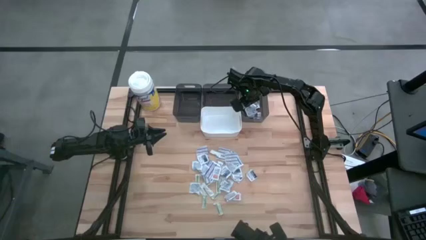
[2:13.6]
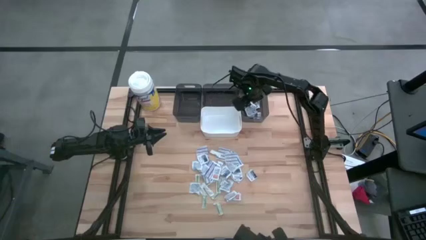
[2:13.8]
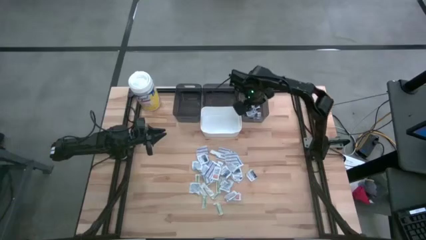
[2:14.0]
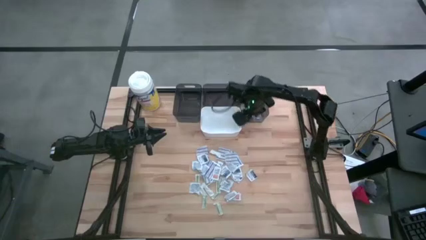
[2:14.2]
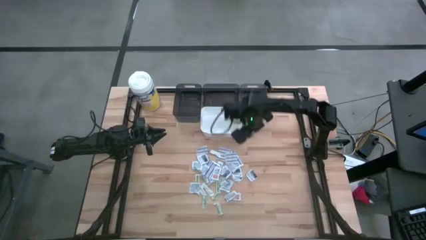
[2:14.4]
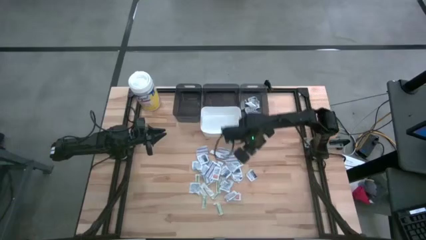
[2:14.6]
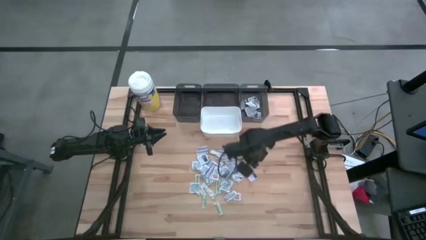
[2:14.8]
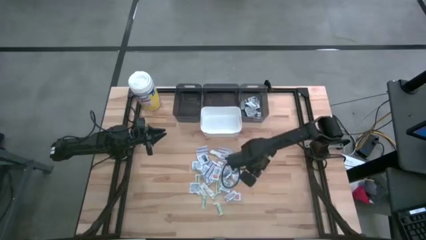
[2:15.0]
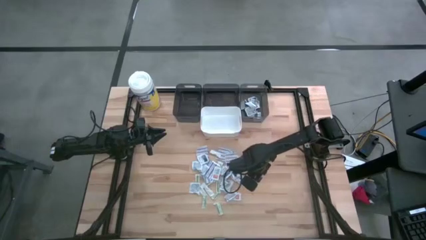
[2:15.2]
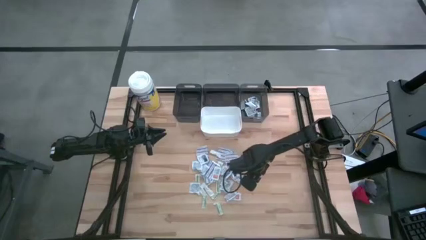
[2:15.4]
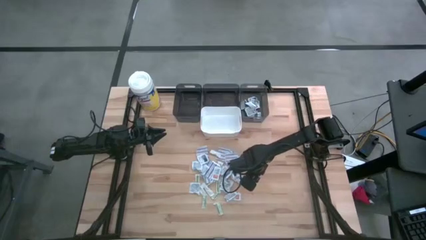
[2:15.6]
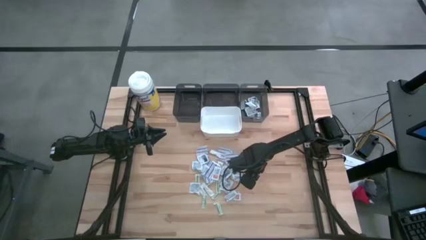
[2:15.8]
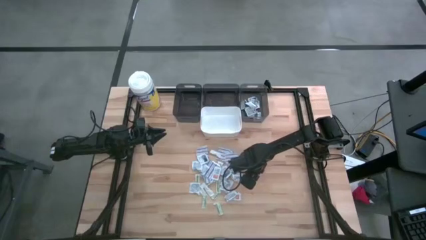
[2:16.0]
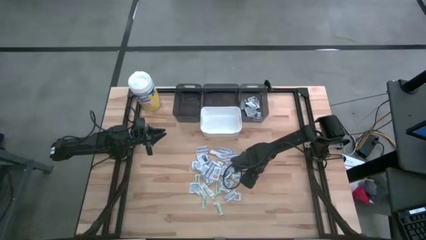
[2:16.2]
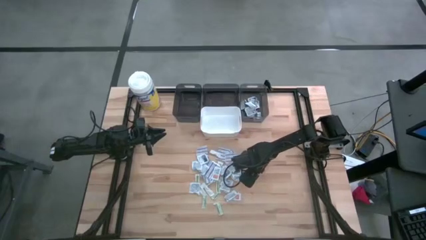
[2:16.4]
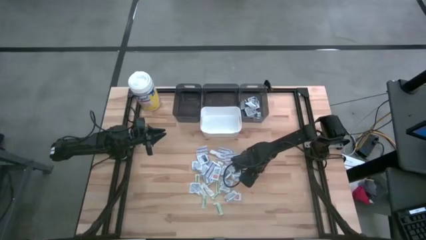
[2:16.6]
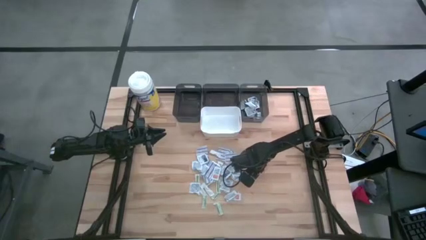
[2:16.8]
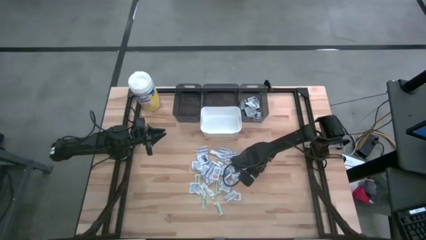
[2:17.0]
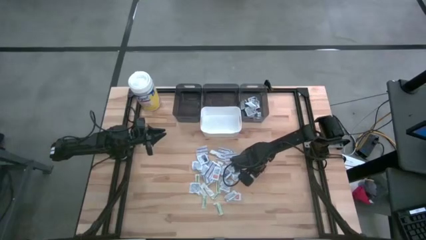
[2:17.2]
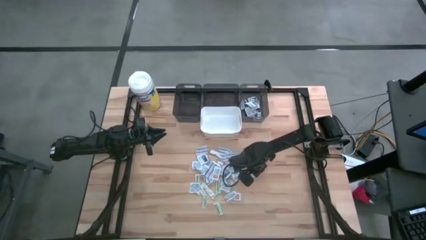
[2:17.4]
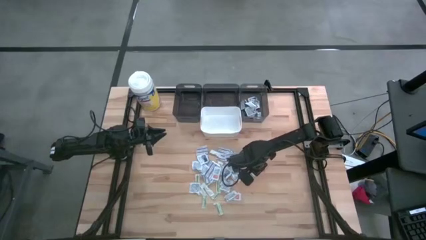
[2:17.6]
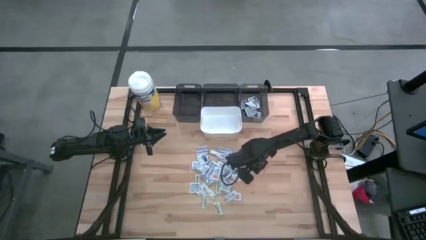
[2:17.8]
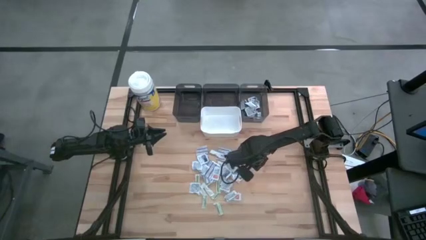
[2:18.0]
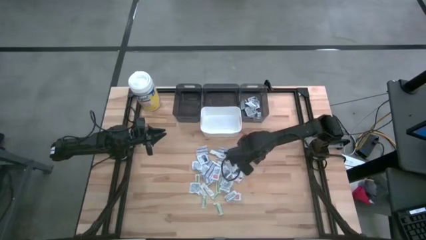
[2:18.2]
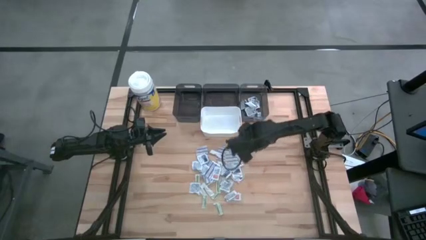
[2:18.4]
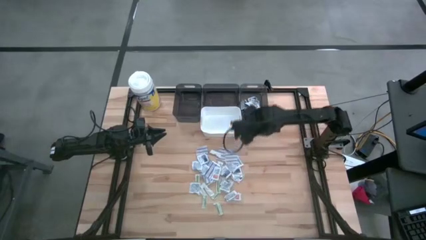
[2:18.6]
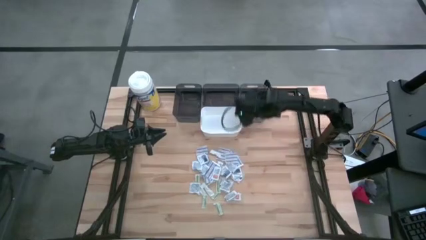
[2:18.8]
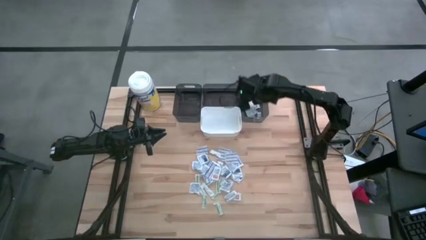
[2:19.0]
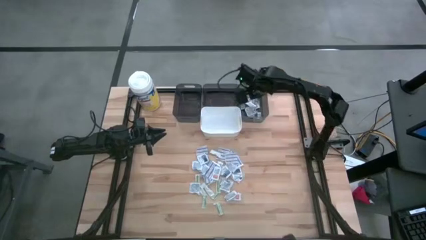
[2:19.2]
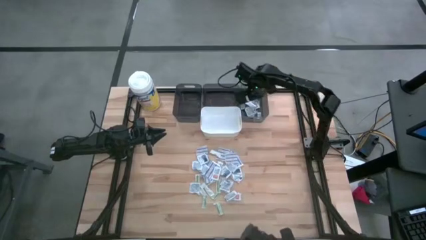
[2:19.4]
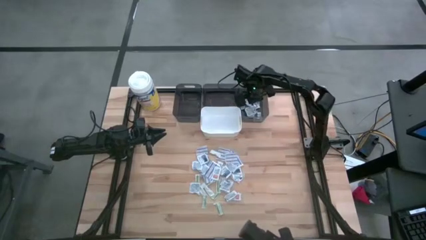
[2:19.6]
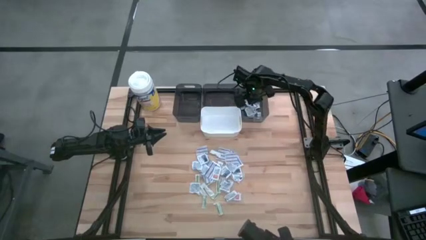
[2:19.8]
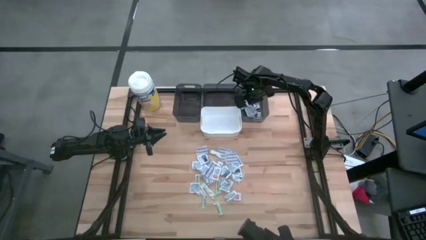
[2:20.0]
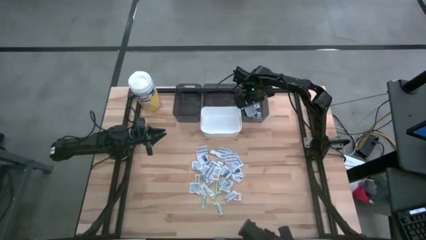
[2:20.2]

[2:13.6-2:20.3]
Task: Pick & Place First Aid Supplies
Put the blue alcohol pad into the right black bin

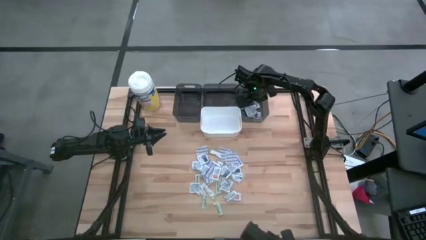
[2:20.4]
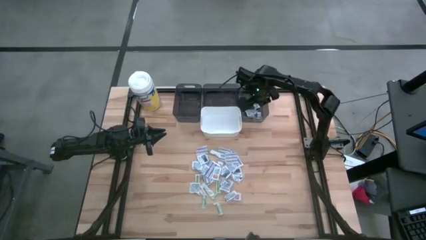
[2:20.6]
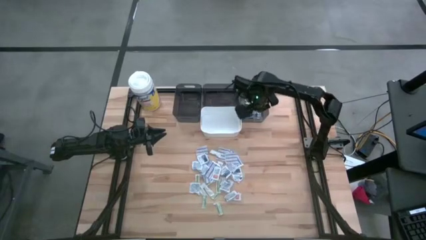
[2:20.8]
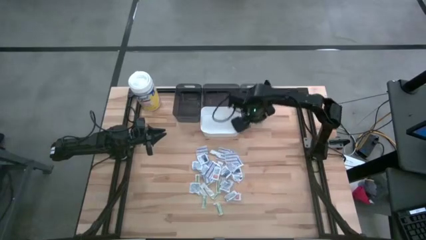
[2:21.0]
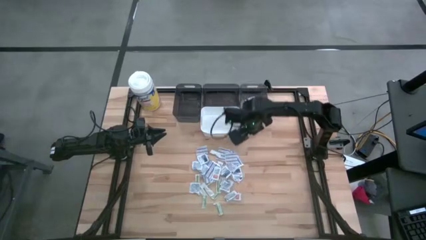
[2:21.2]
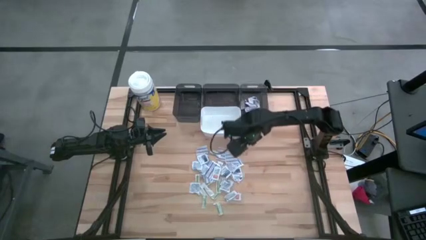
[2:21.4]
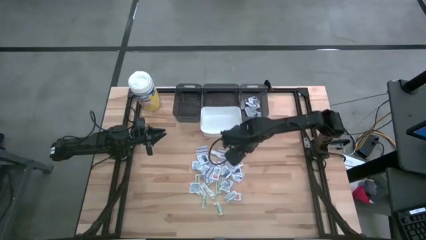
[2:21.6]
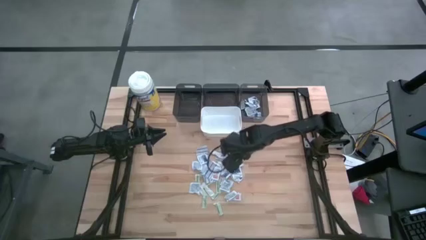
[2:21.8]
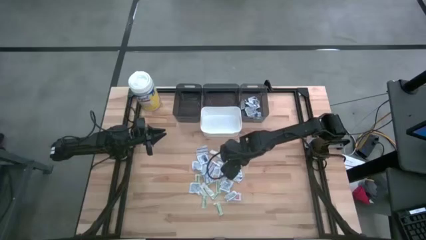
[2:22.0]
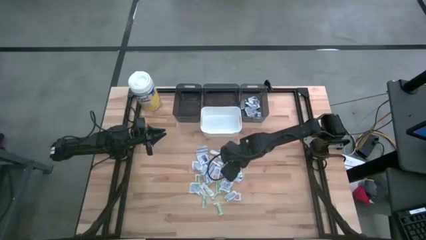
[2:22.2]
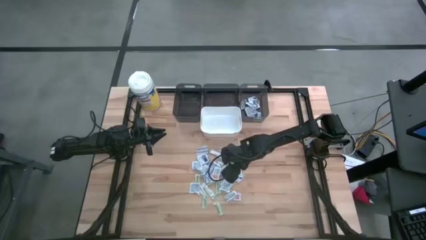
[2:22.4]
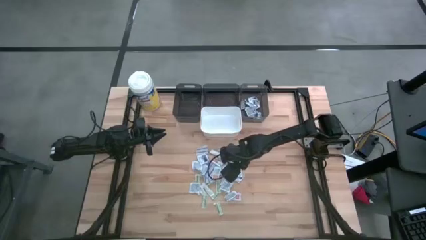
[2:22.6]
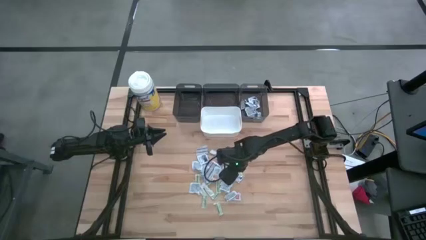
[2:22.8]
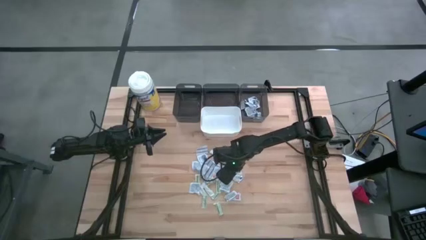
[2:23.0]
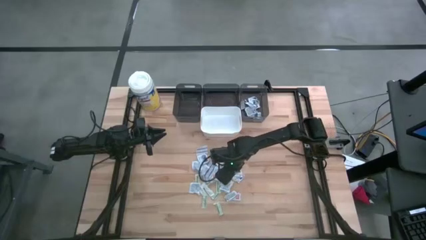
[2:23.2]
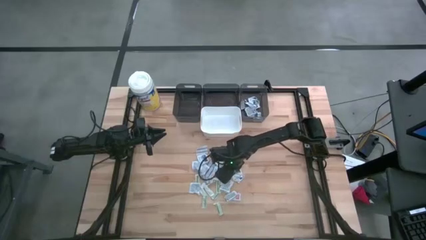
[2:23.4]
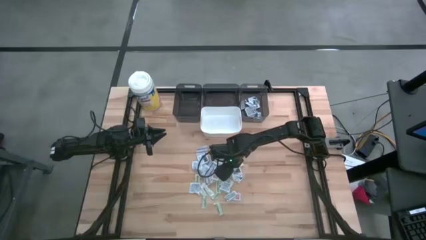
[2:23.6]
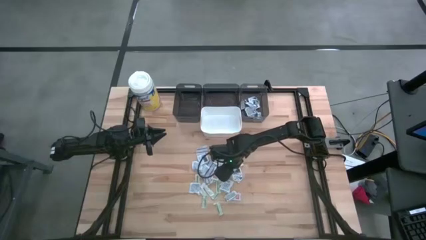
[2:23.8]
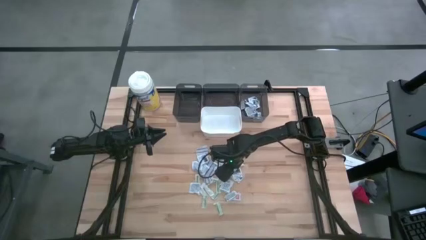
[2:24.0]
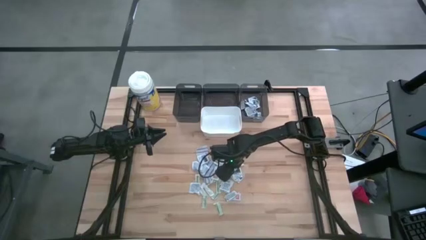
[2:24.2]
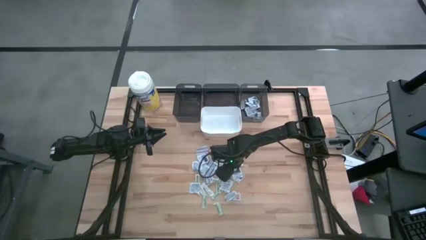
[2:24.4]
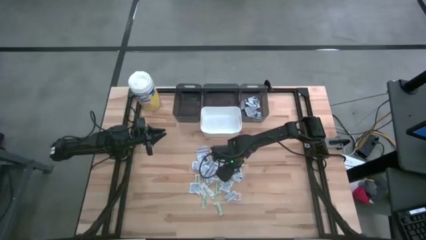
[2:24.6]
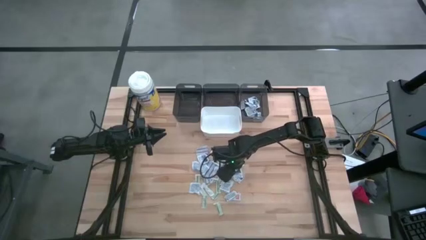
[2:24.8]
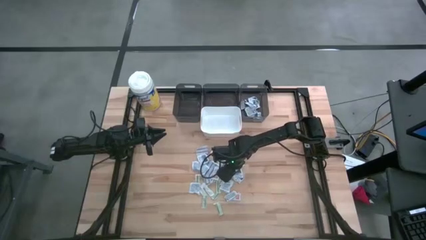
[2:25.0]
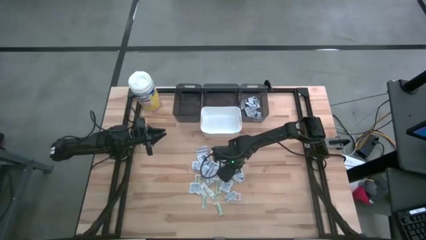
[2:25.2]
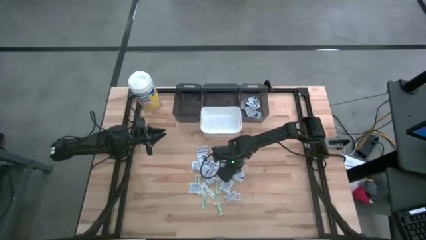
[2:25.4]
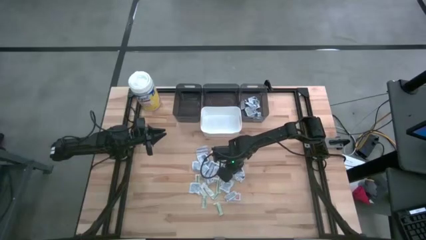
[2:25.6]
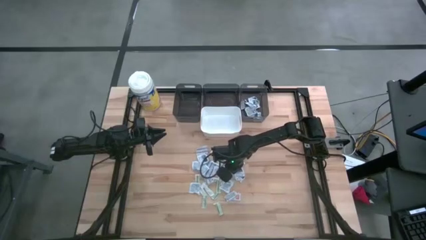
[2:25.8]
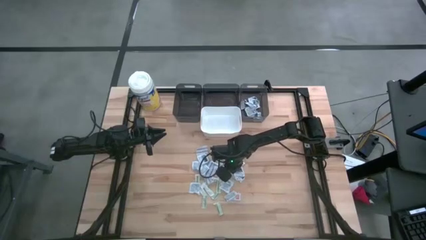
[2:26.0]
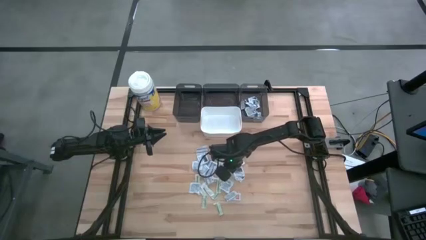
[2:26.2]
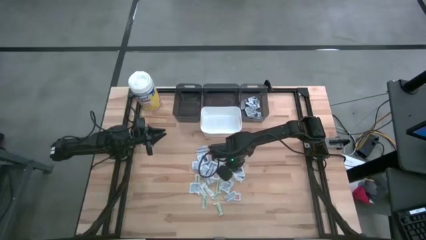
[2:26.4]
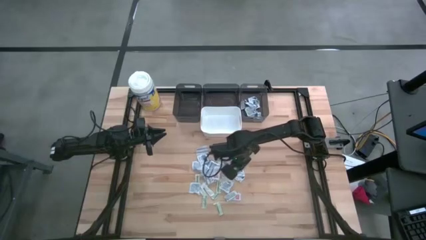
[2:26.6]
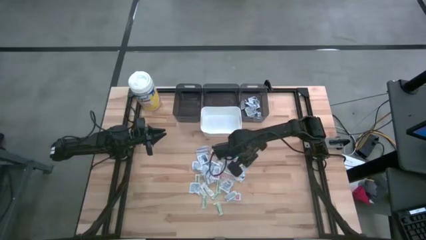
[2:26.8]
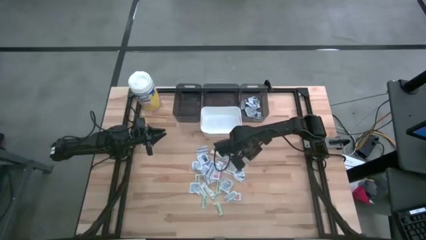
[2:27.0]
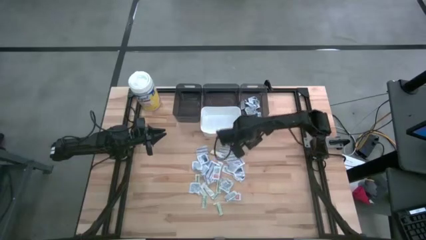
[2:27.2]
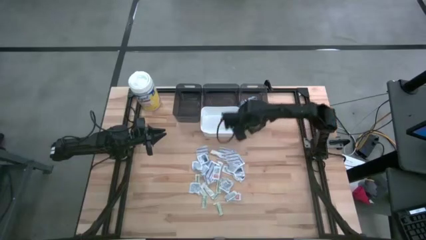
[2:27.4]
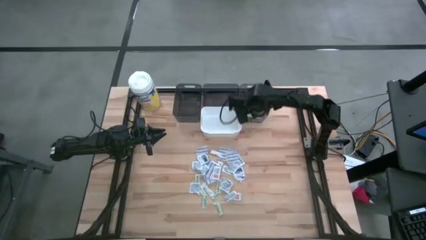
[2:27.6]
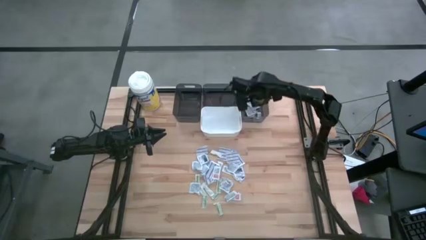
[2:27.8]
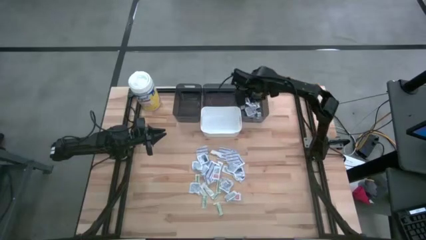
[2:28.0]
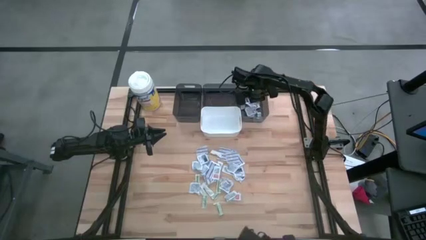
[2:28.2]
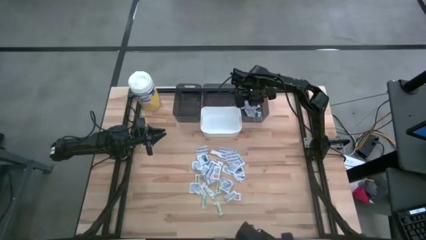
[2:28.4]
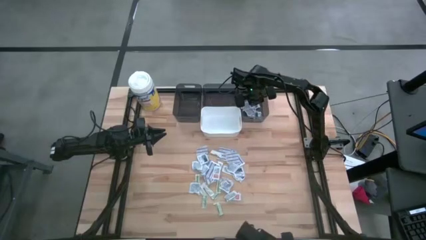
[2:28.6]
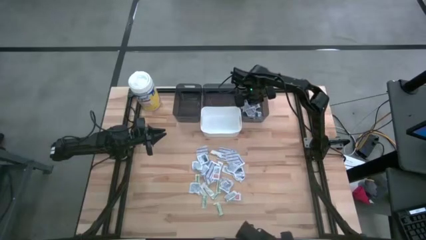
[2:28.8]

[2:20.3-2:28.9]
Put the blue alcohol pad into the right black bin

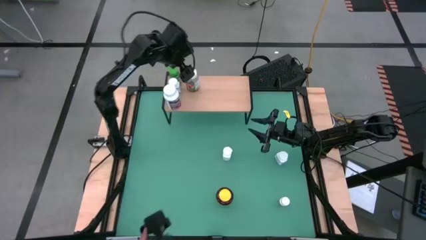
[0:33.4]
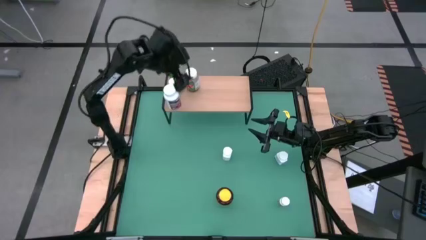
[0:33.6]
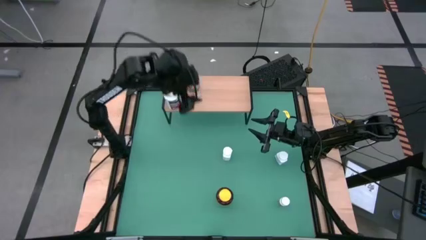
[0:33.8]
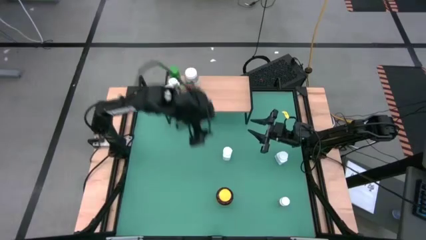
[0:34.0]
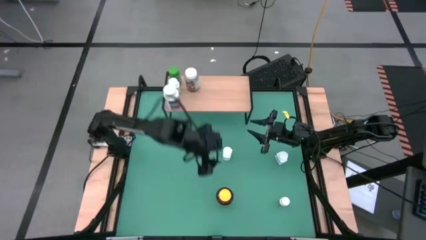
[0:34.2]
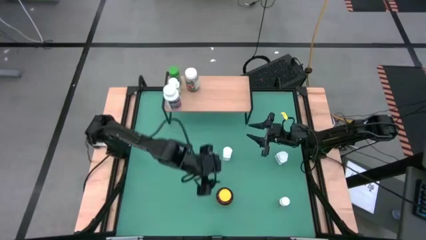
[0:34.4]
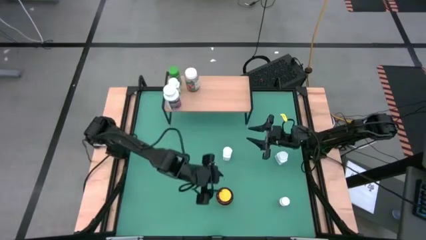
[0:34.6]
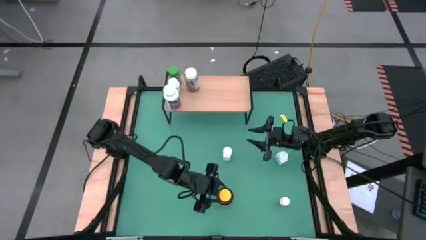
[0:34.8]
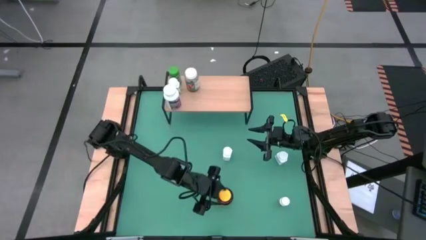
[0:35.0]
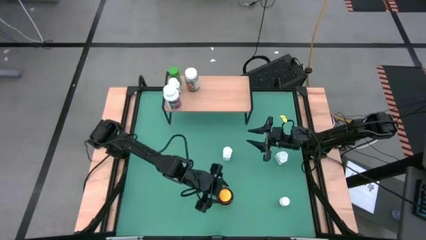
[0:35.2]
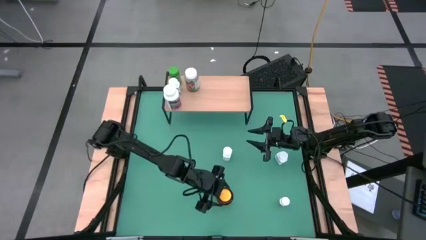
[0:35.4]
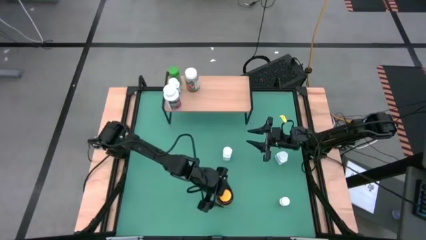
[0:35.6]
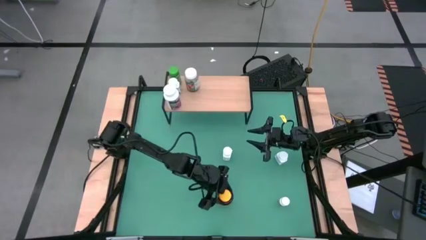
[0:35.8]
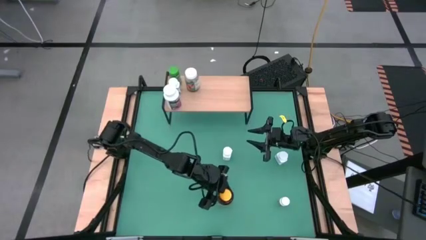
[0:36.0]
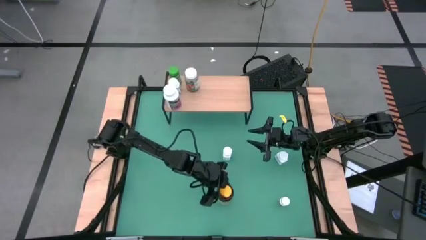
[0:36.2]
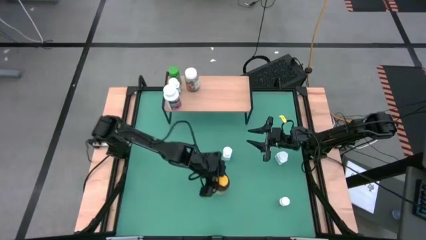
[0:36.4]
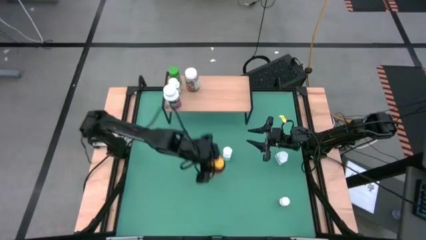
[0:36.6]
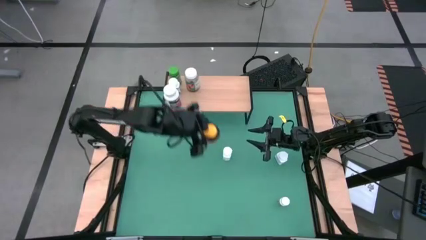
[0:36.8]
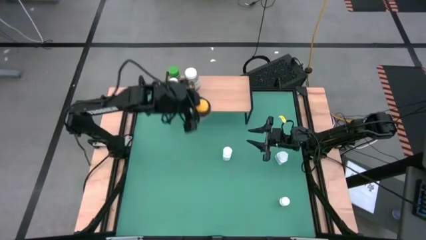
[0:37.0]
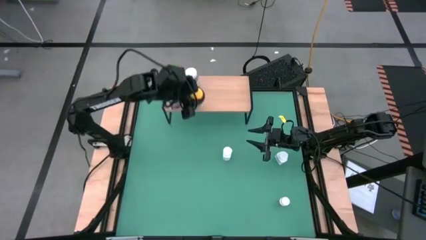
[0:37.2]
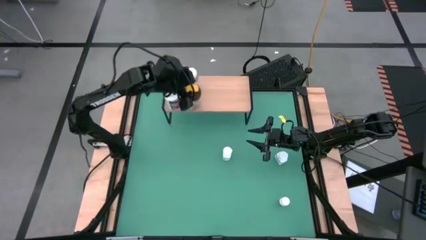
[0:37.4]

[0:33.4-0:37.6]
Task: Pick and place medicine bottles onto shelf by color
Put the yellow supplement bottle on the shelf
